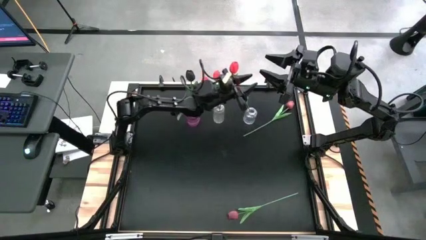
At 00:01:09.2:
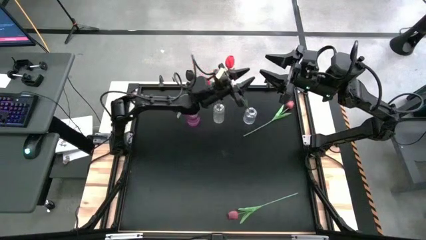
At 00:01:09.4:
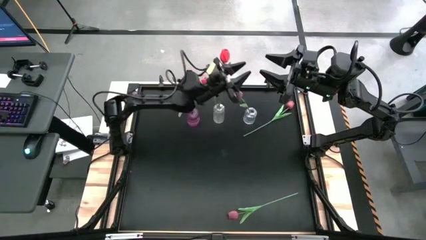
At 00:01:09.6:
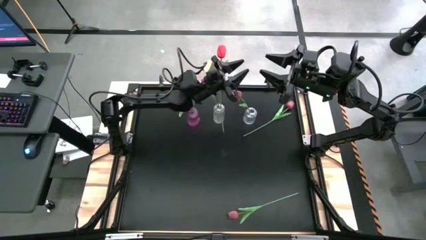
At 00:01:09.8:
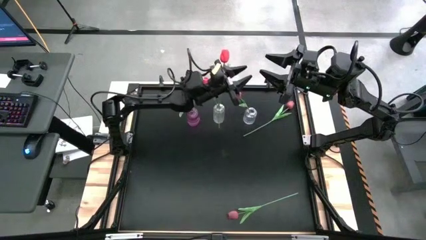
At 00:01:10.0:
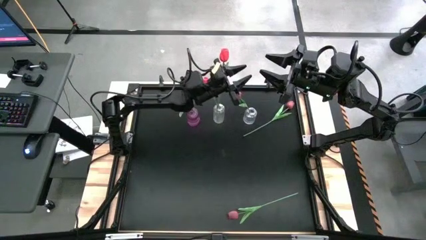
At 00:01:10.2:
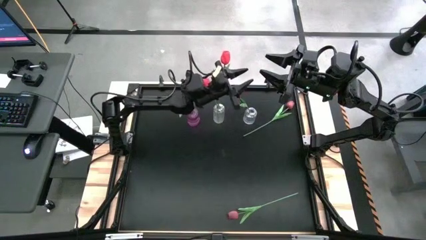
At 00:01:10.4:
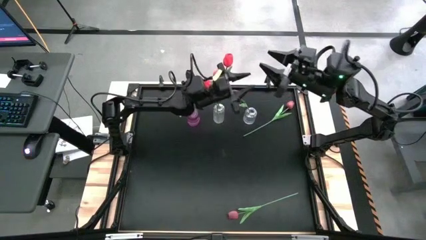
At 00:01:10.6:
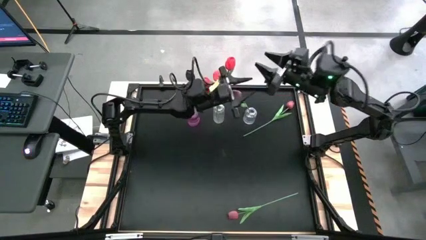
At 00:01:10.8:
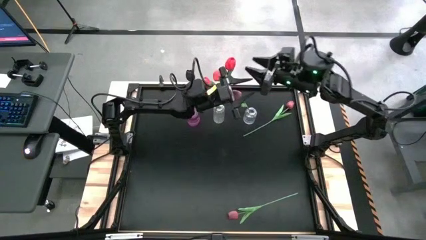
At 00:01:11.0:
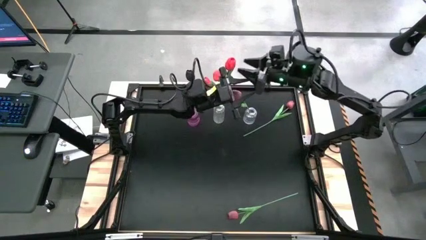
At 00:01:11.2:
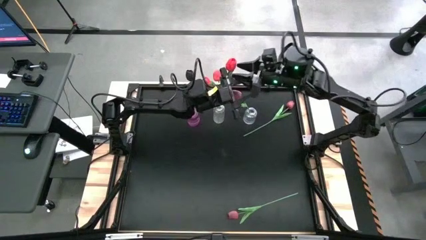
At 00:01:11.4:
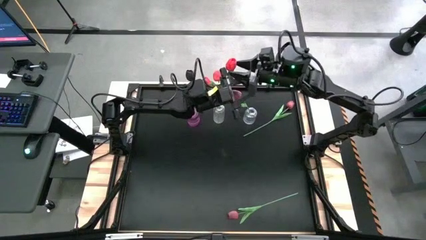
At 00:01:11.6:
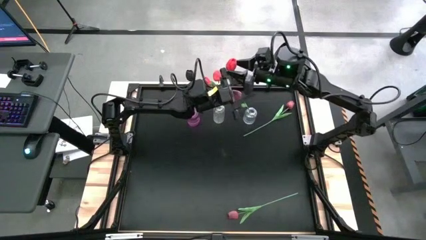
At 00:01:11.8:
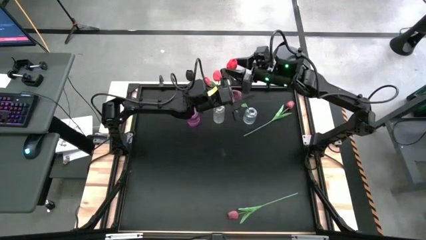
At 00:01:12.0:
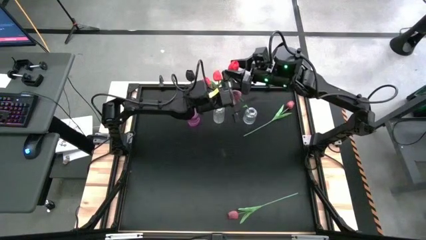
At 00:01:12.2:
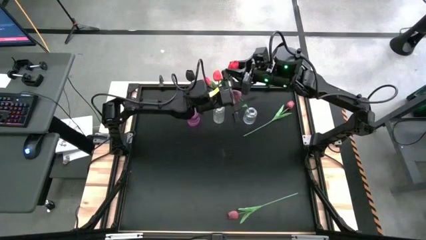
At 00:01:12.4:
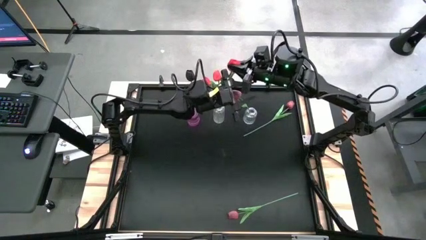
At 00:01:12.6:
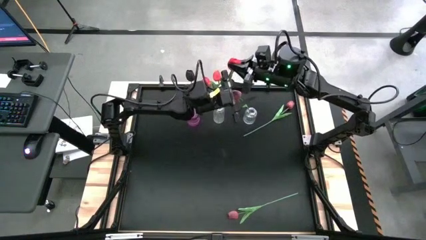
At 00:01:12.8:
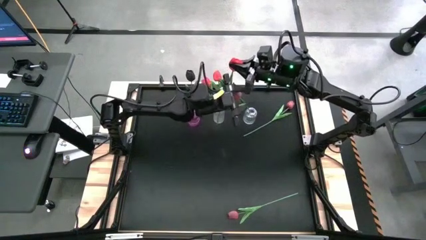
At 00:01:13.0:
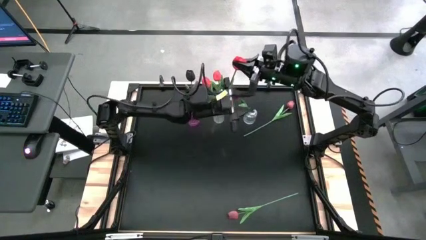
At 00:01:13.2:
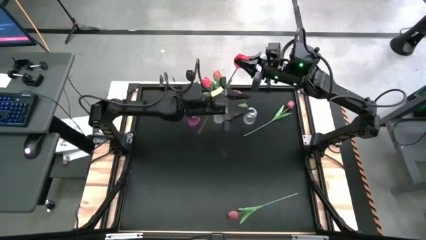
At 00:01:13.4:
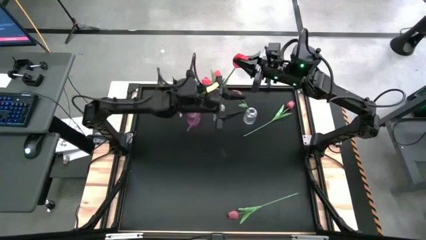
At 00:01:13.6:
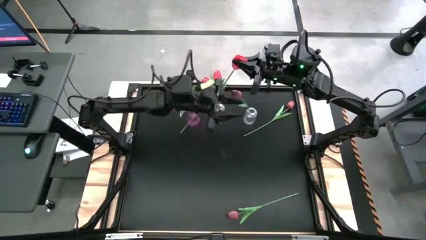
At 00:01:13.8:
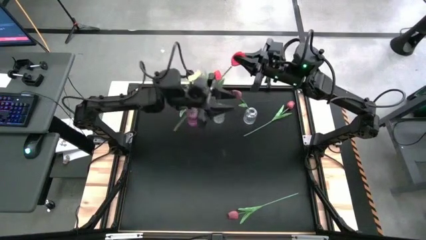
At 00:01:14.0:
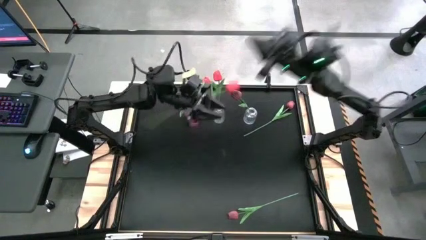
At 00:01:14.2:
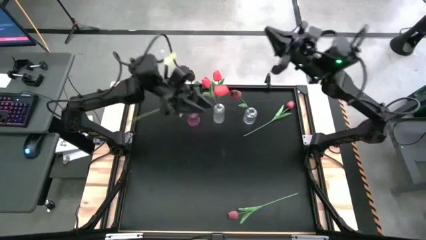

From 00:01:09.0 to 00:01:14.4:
Task: Sort flowers into vase by color
Put the red tulip into the left transparent flower vase

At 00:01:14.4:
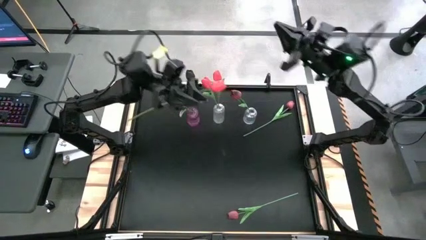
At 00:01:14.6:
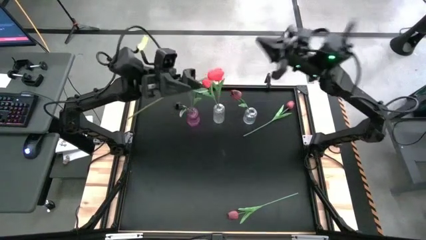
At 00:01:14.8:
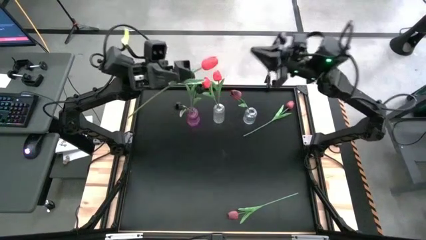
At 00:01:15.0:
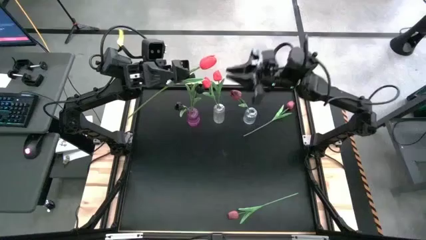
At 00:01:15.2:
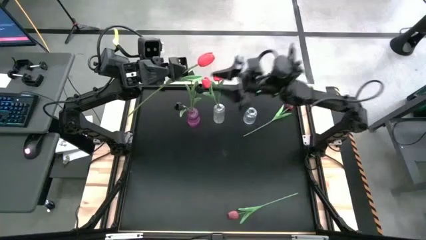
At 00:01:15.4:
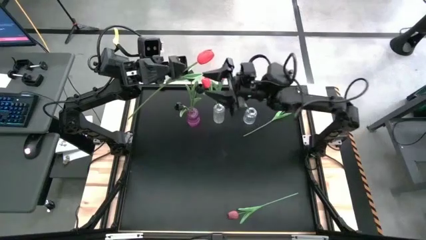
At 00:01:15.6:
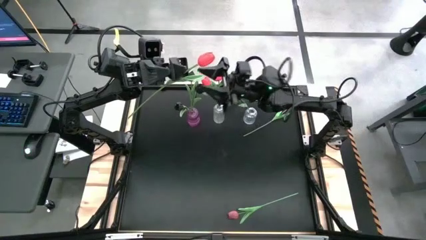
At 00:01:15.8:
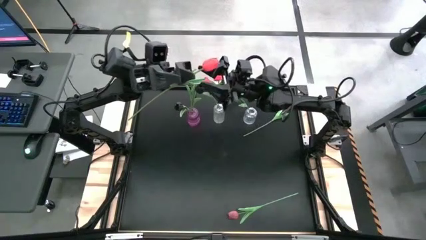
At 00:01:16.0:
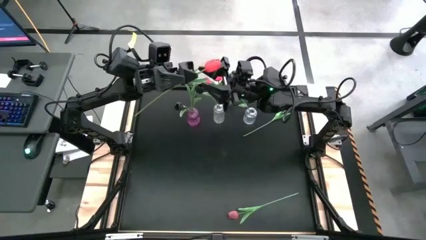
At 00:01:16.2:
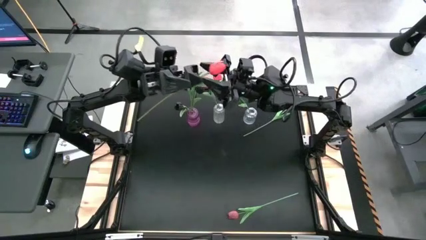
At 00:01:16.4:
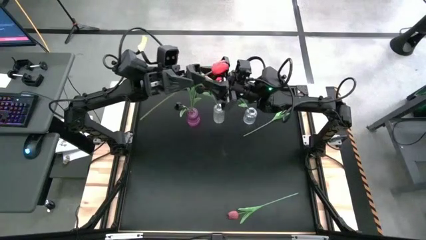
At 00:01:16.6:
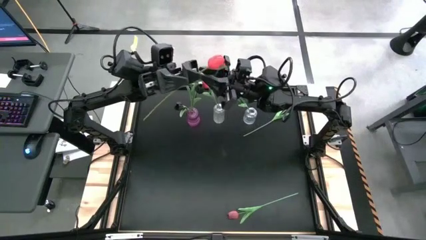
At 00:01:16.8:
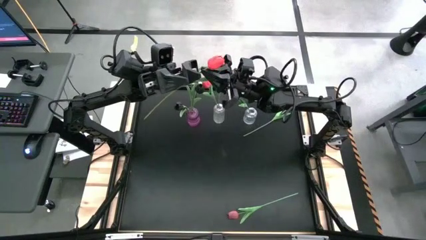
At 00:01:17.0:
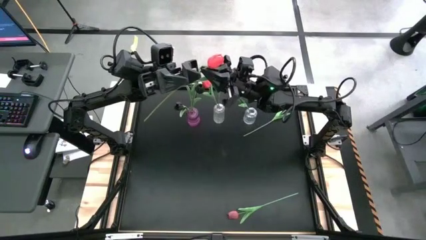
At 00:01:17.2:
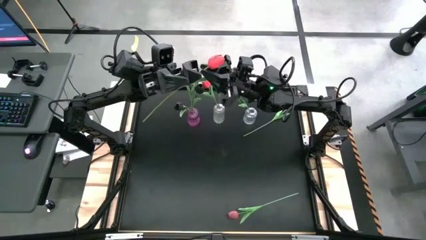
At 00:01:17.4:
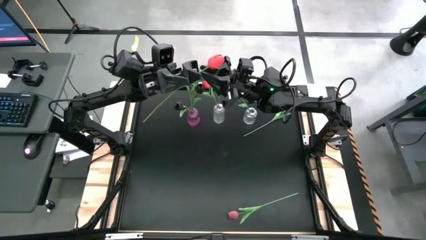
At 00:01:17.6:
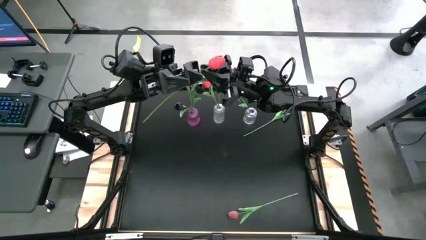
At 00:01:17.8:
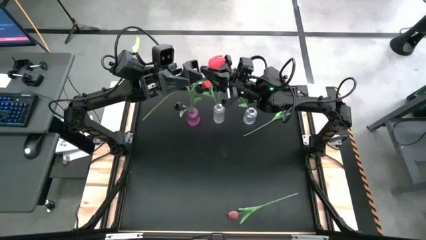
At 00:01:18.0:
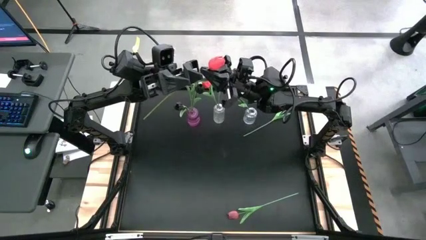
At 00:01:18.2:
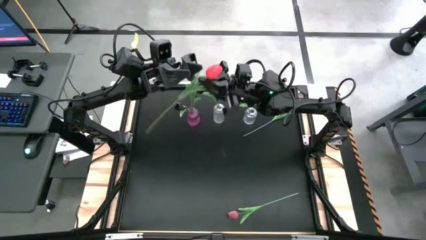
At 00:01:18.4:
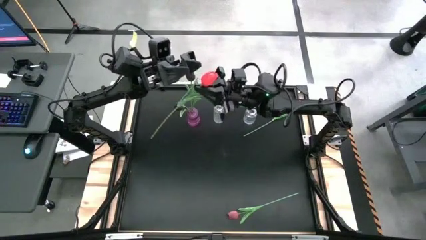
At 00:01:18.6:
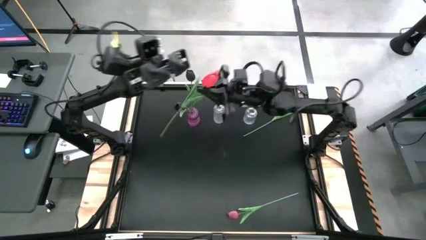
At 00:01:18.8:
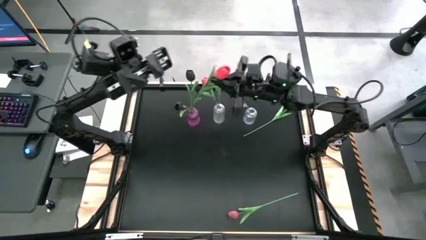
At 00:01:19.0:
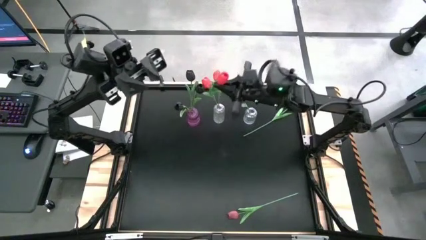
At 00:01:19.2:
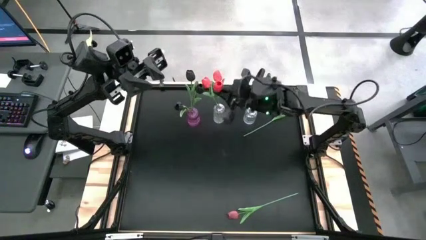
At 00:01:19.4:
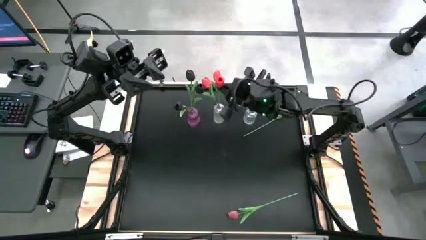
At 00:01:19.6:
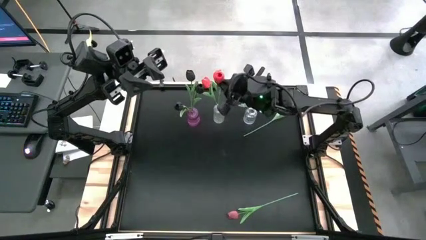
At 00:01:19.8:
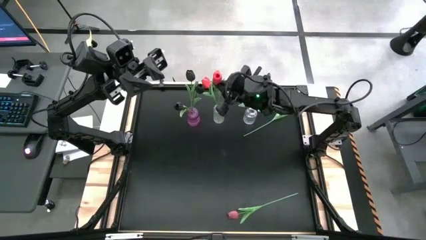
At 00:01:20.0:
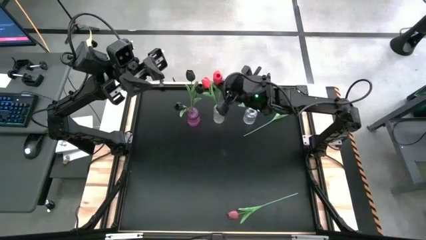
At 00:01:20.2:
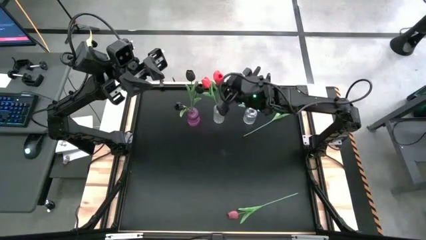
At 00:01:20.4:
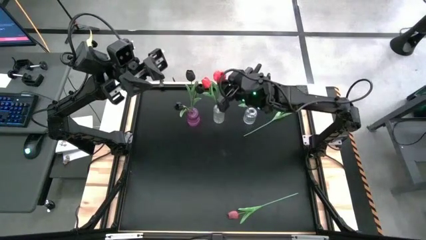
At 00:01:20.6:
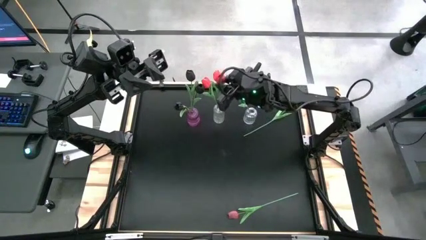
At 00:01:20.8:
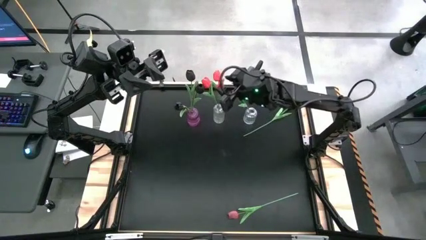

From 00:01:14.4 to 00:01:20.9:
Put the red tulip into the left transparent flower vase

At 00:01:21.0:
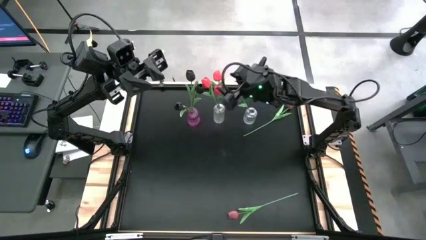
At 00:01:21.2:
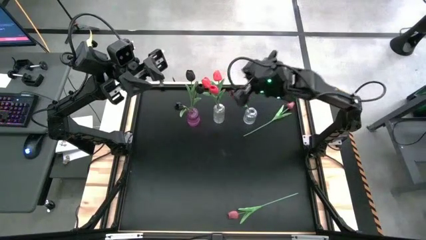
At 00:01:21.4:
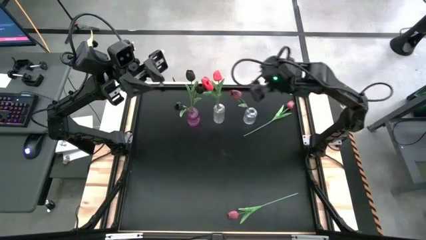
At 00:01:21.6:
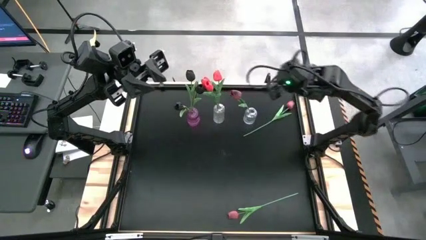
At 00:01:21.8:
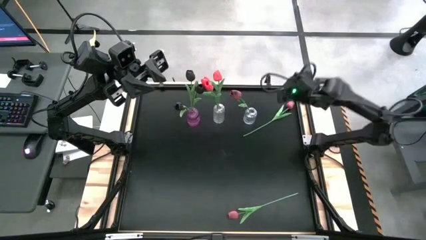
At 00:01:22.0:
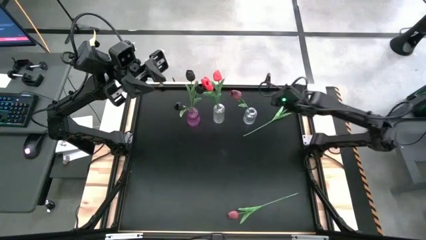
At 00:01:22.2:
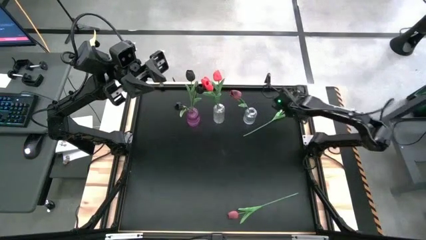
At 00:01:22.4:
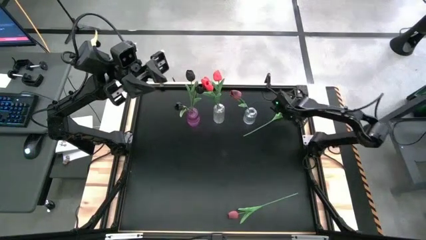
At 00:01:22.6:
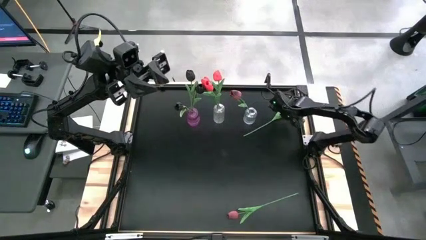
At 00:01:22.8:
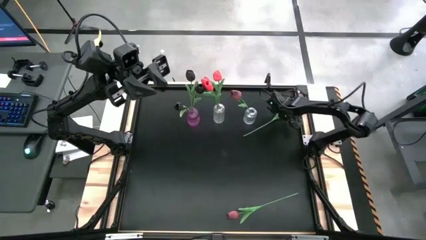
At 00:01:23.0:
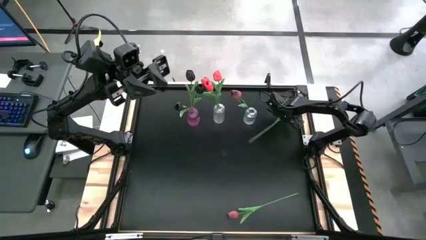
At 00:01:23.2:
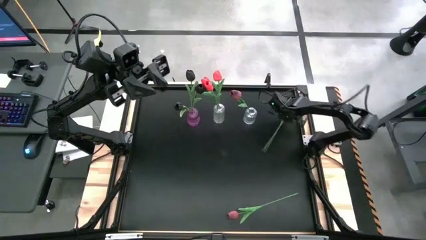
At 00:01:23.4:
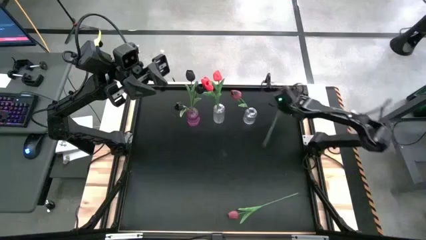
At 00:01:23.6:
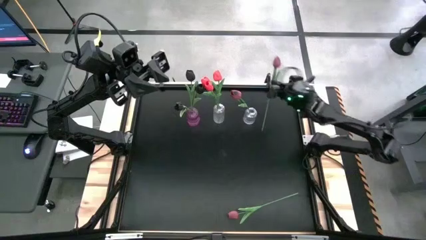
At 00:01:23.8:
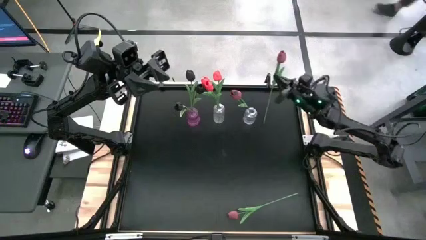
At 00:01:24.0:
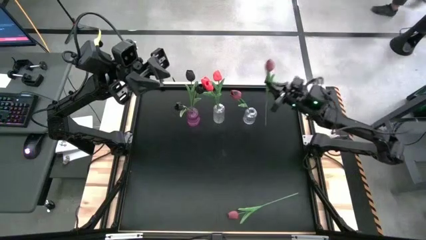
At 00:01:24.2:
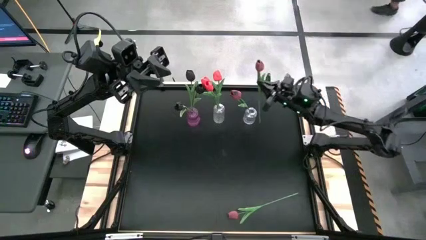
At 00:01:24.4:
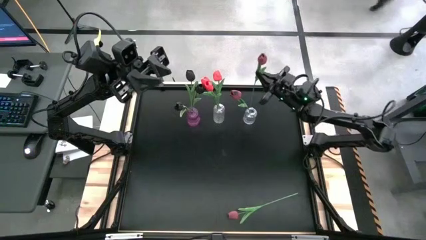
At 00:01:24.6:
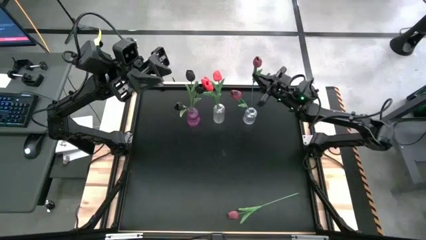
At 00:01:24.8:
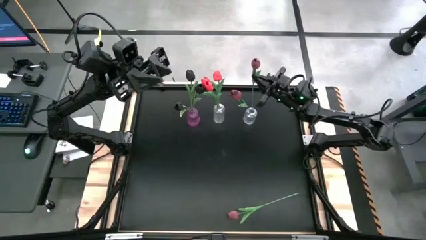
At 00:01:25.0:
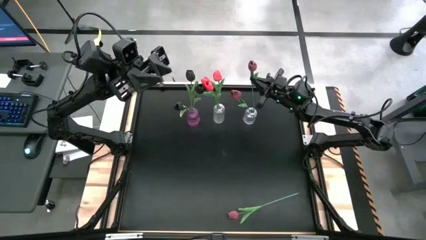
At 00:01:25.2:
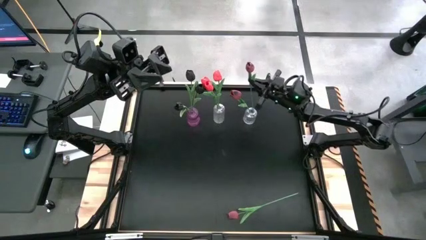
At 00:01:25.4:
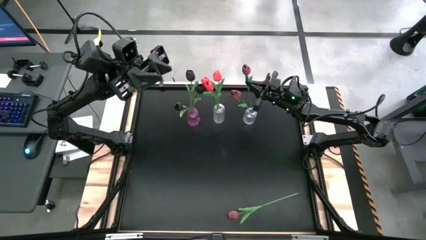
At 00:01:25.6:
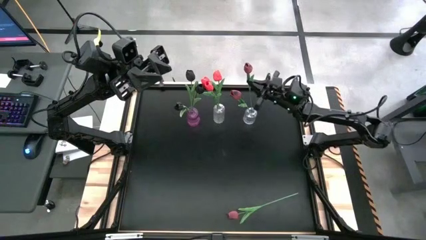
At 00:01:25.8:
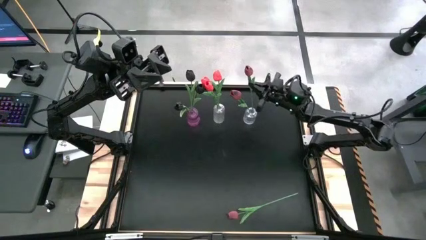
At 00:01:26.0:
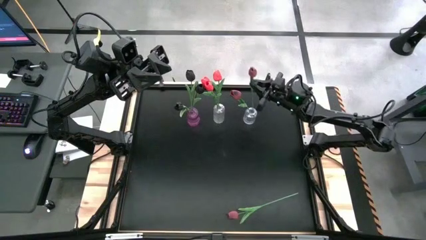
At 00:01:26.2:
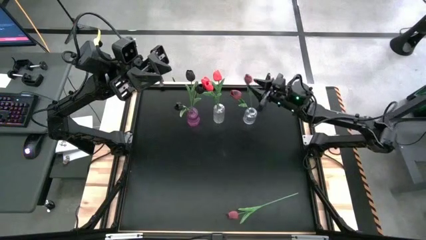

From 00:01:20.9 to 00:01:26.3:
Put the top dark red tulip into the right transparent flower vase
